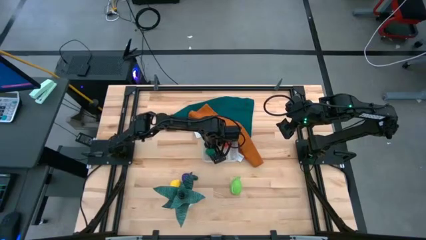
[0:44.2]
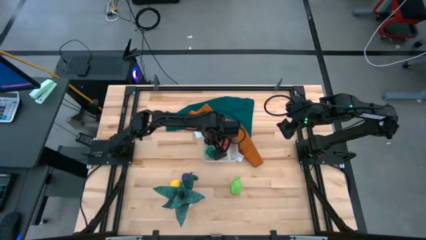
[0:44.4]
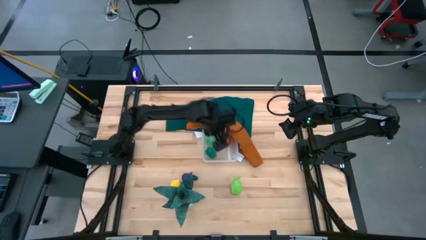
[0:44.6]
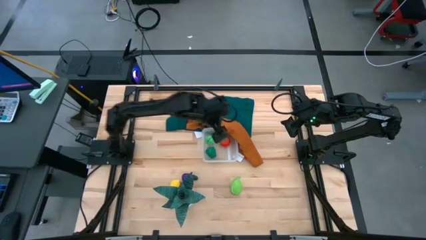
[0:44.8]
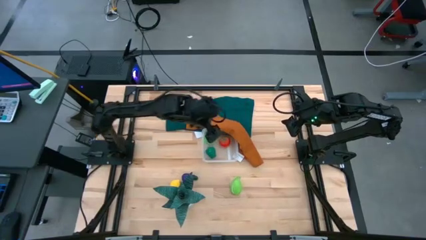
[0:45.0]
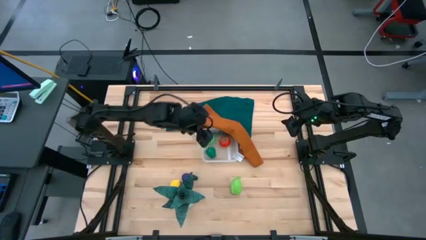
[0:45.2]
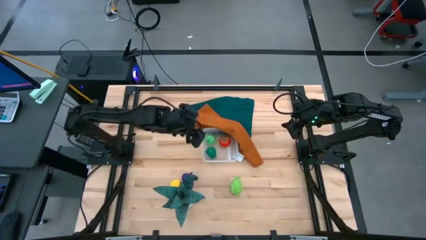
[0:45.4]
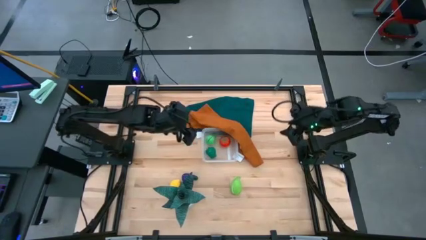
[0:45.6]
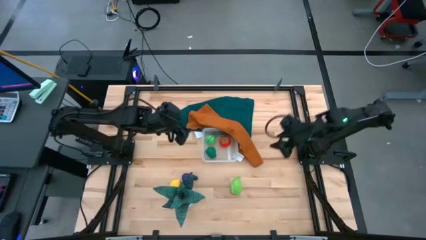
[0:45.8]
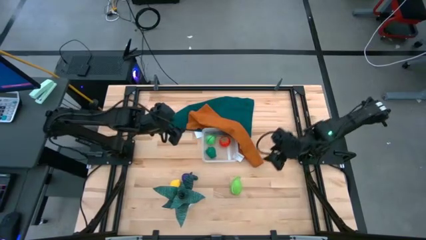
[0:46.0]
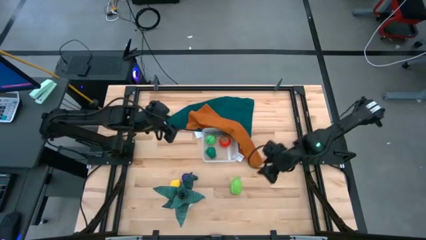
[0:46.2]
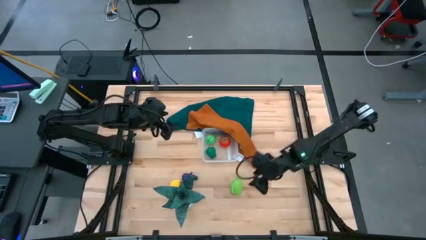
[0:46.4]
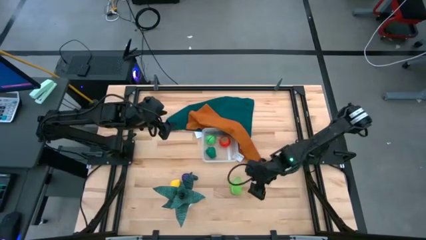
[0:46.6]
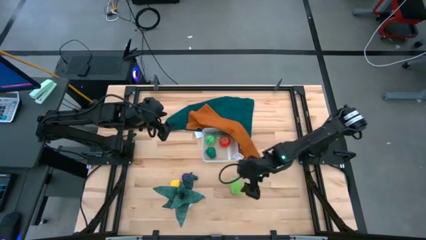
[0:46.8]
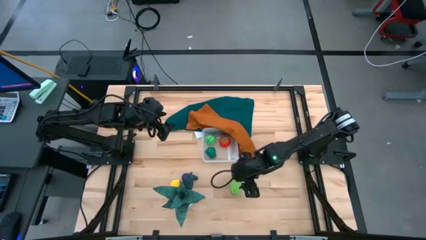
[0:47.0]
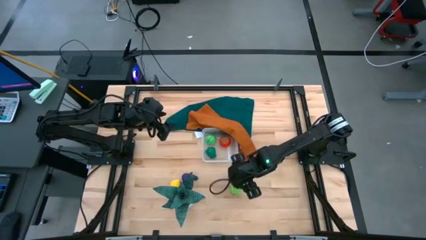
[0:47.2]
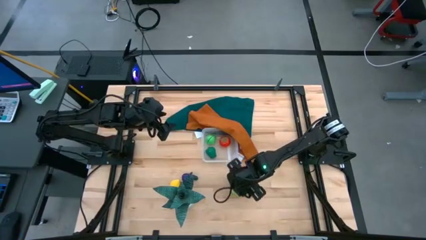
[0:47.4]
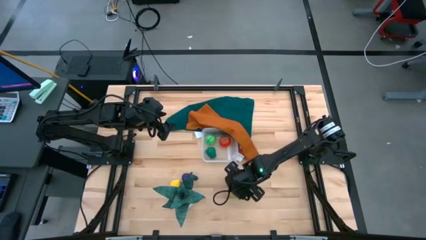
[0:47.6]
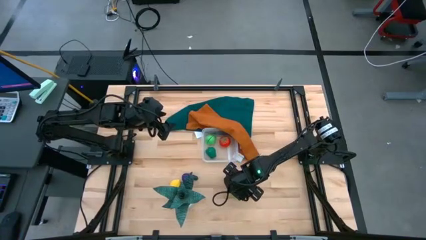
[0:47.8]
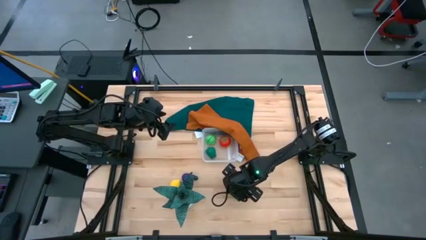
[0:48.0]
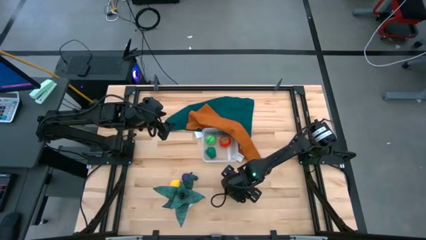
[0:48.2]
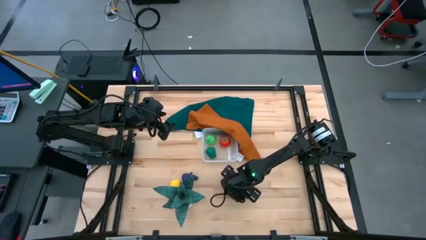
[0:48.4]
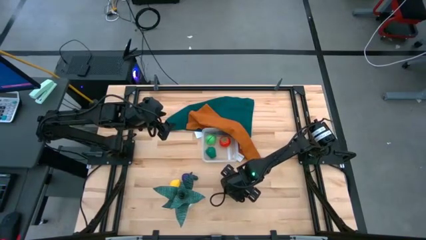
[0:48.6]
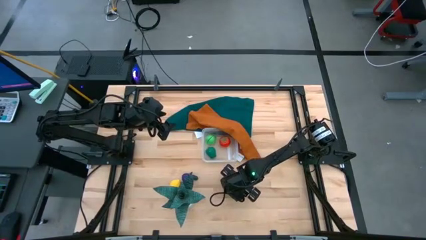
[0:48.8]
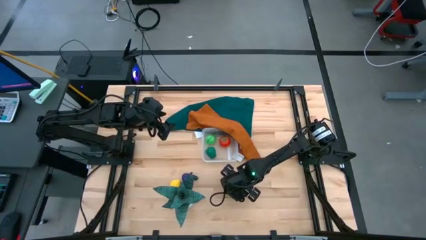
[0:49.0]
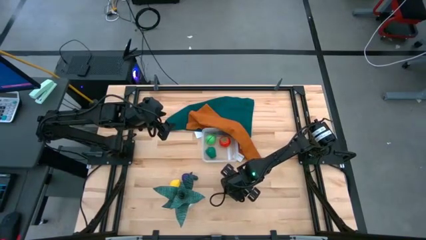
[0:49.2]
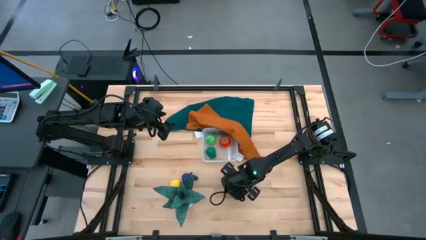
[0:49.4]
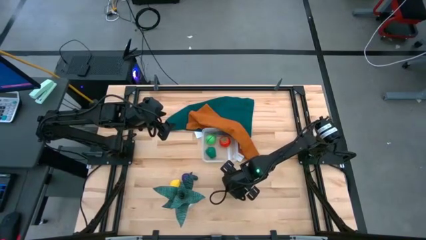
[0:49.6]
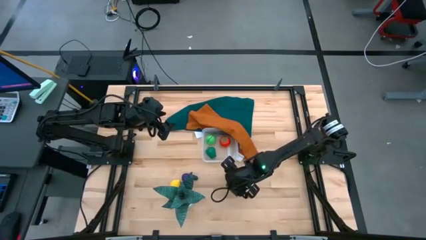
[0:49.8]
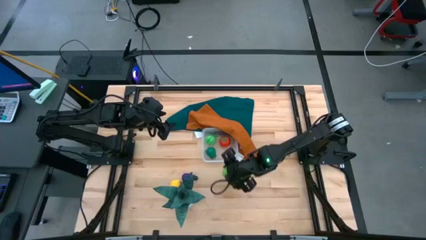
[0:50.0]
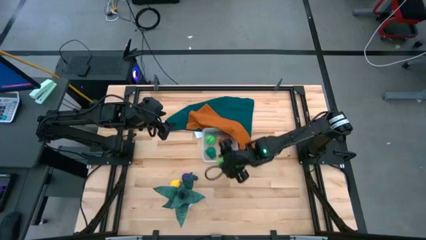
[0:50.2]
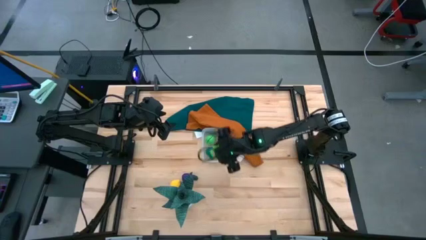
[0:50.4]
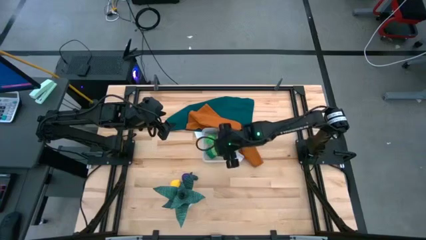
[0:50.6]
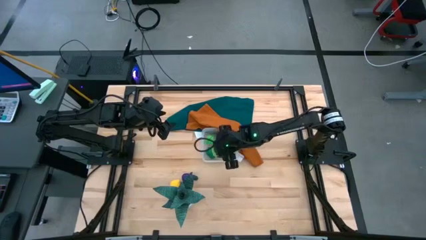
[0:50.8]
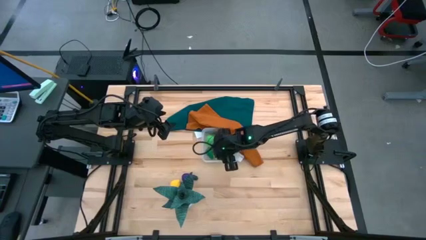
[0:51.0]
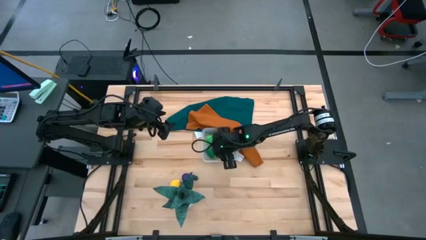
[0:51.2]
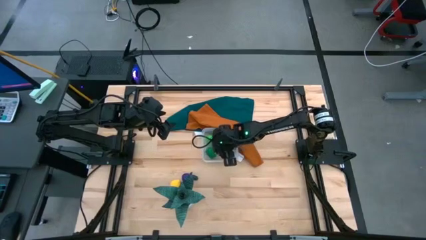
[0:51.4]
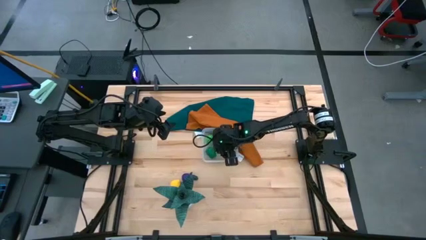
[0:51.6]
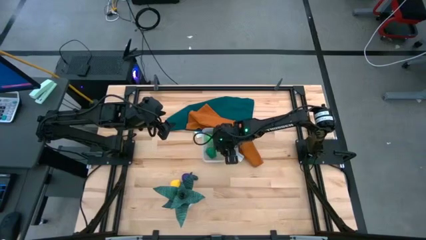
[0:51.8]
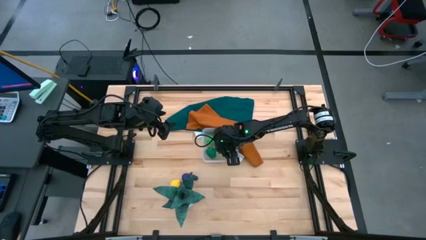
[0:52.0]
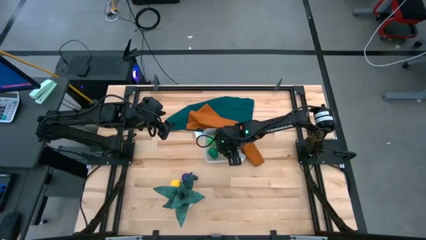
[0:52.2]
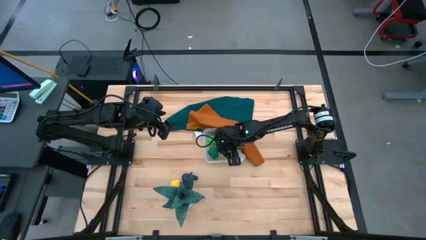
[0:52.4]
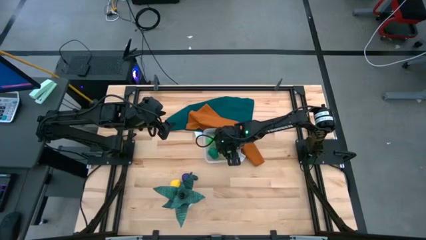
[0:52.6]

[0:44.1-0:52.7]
Task: Pick and placing Produce into tupperware
Put the melon into the transparent bin

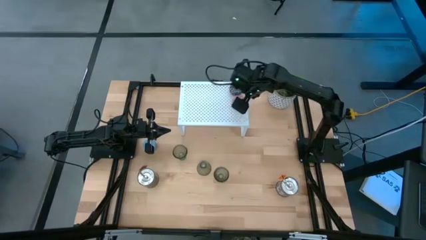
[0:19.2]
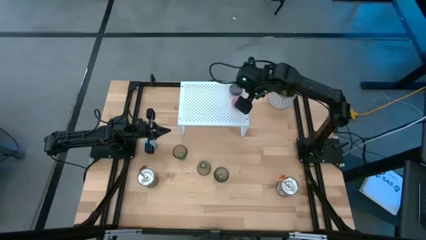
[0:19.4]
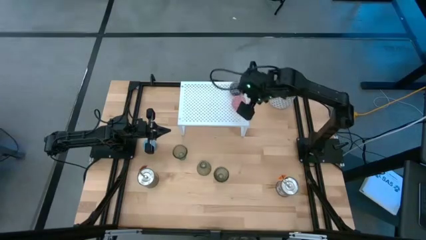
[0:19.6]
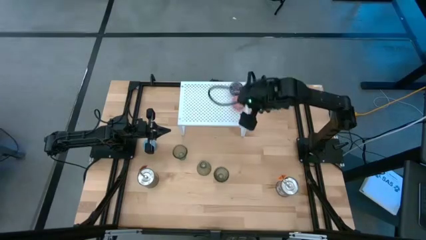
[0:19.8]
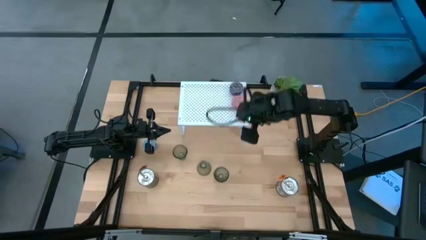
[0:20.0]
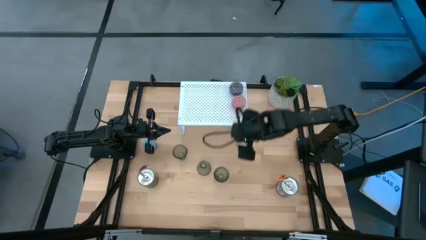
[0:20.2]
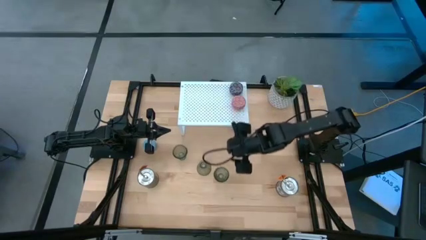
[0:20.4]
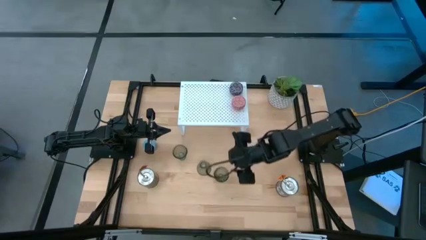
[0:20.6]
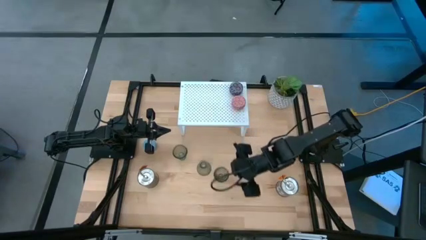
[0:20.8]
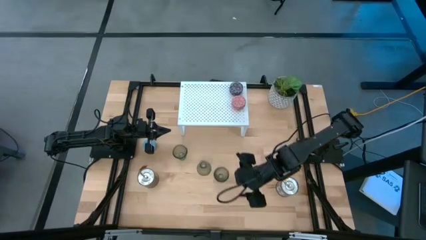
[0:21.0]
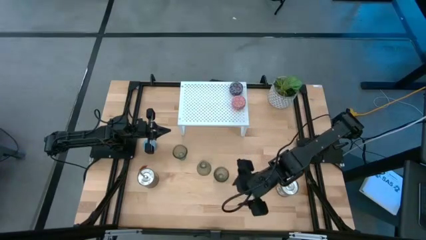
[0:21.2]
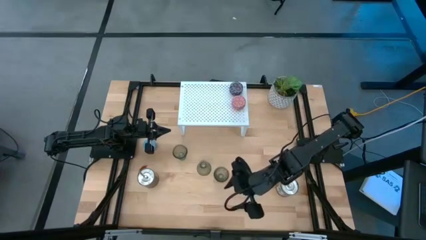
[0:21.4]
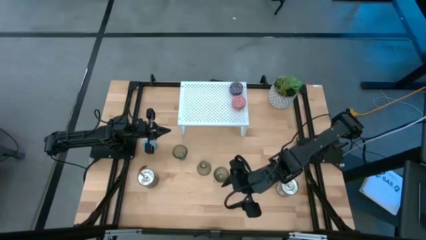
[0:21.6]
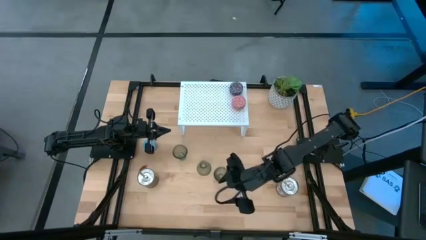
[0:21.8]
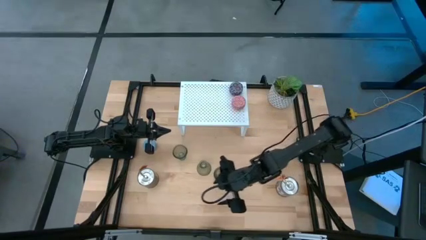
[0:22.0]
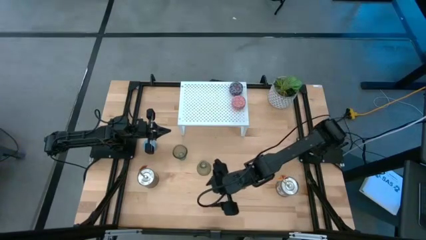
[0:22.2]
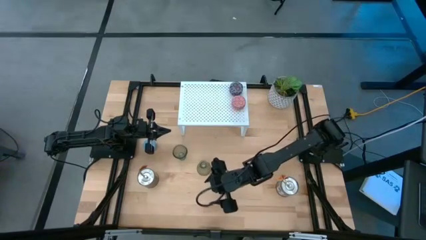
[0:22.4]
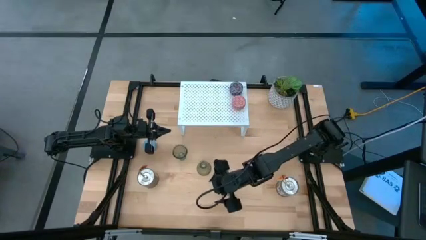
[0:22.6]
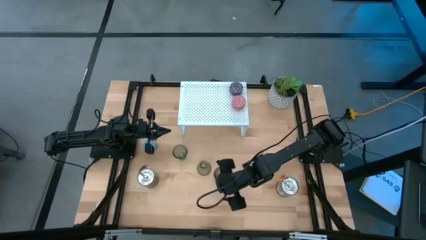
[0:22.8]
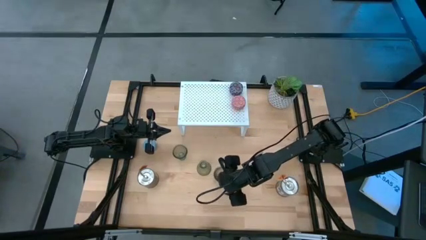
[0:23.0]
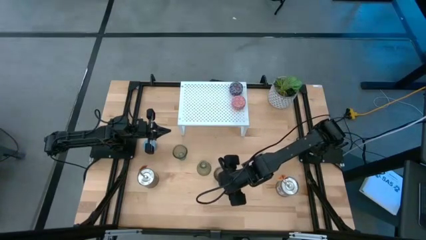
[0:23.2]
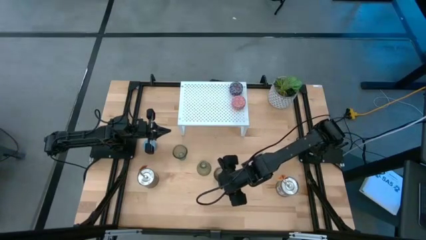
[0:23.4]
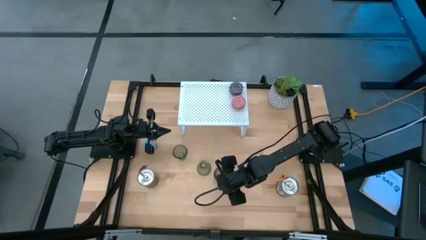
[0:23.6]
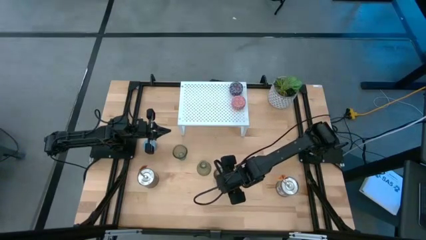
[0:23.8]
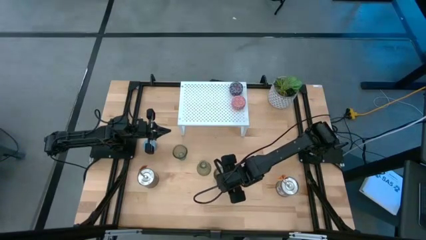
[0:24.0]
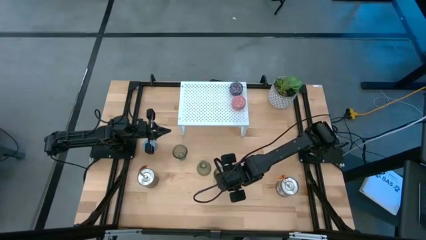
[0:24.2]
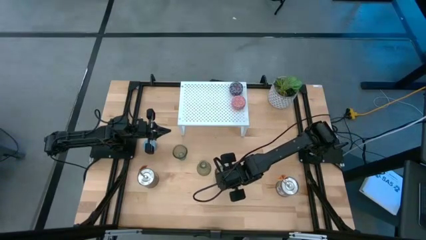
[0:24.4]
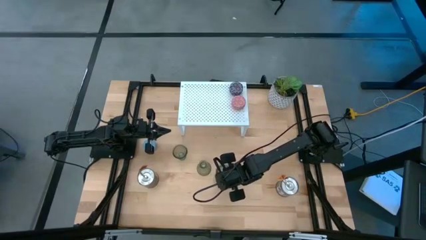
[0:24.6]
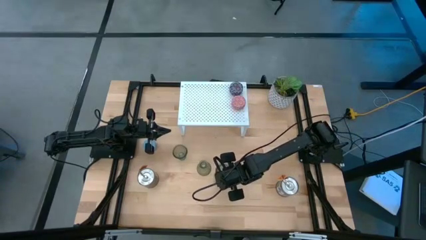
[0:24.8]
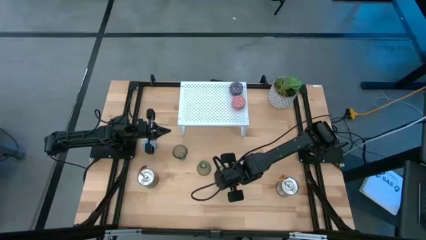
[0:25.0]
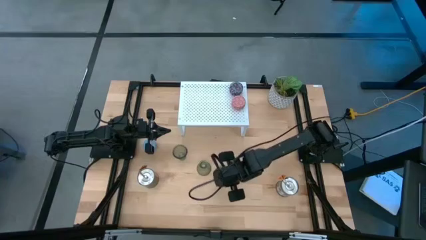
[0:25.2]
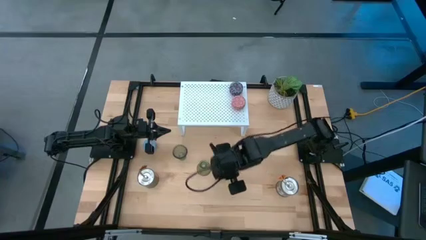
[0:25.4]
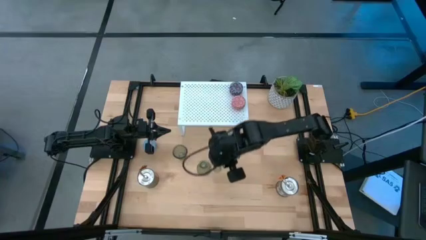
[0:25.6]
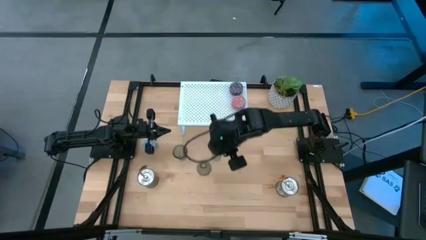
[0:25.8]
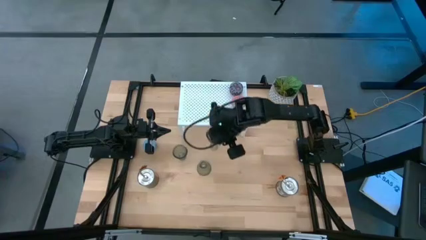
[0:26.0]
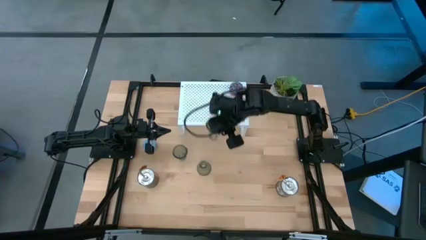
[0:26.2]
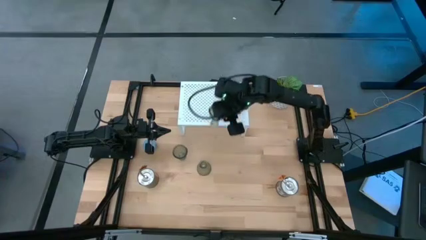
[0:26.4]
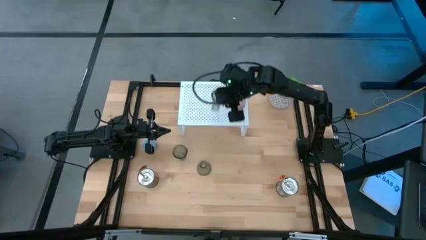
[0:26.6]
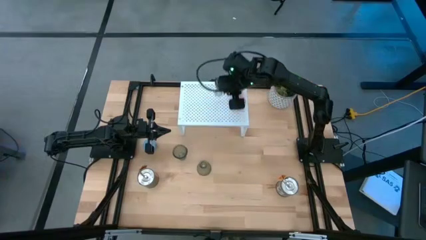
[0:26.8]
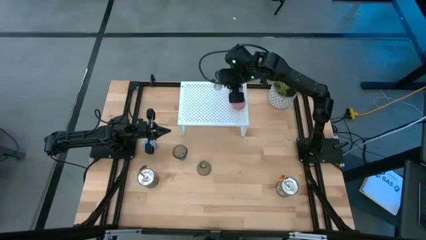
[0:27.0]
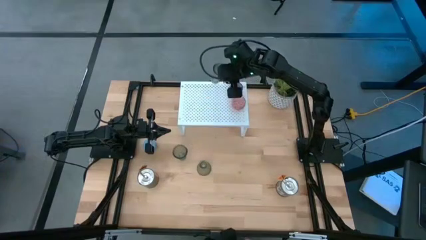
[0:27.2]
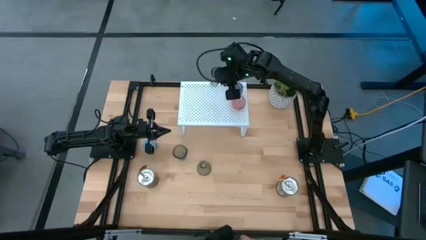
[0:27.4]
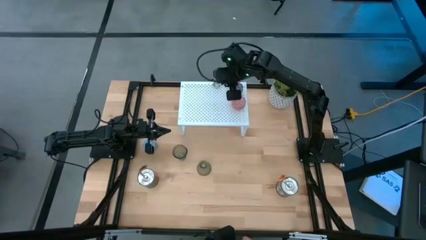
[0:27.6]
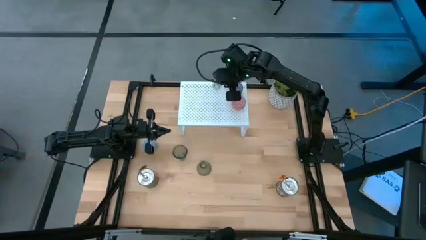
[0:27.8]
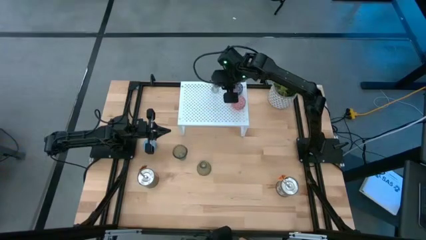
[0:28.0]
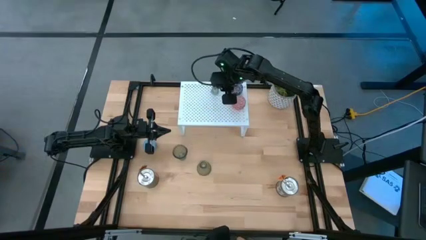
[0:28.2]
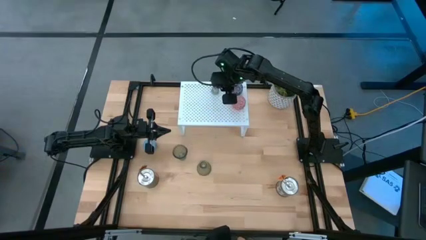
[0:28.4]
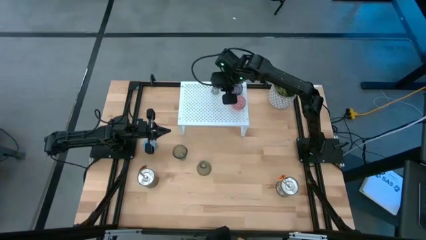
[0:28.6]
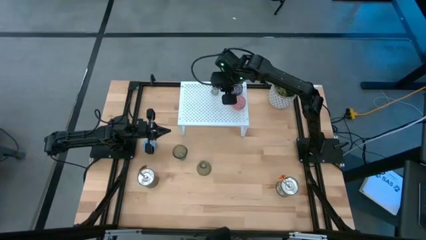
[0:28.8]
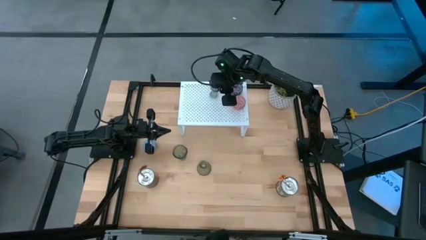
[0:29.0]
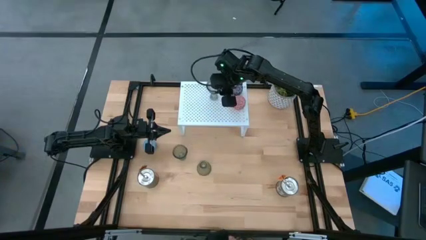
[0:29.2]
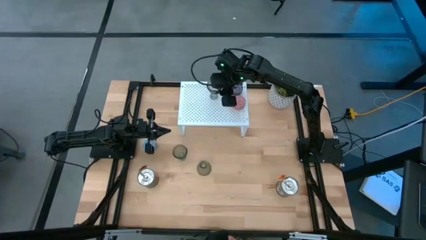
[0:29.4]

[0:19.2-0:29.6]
Task: Pick & Place candle stick holders
Put the bottom right green glass candle holder on the shelf
